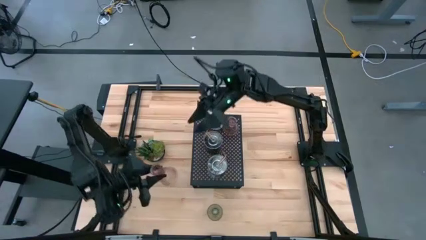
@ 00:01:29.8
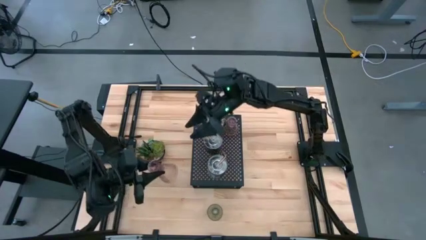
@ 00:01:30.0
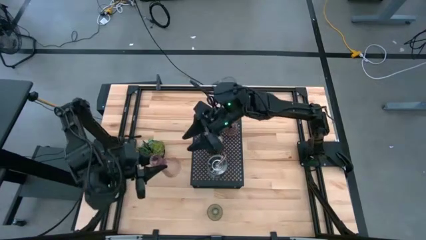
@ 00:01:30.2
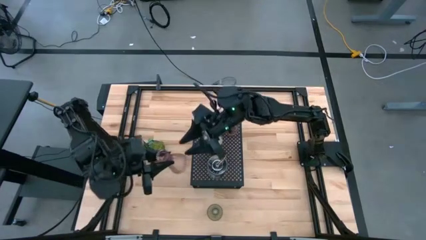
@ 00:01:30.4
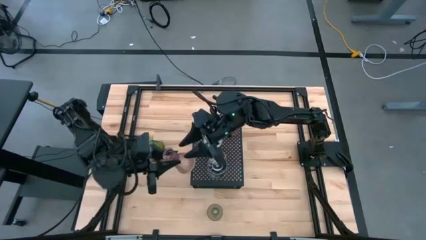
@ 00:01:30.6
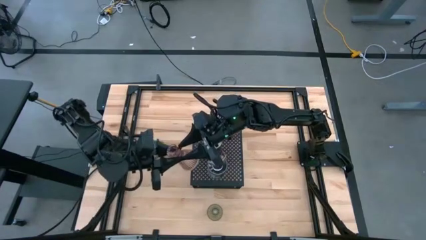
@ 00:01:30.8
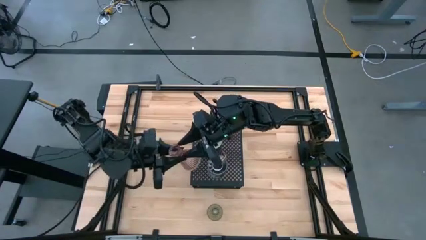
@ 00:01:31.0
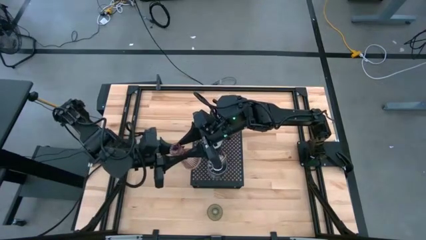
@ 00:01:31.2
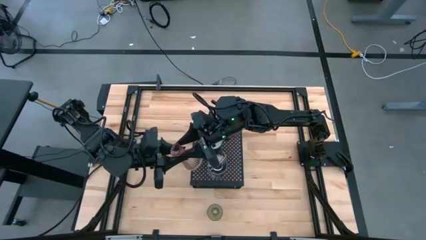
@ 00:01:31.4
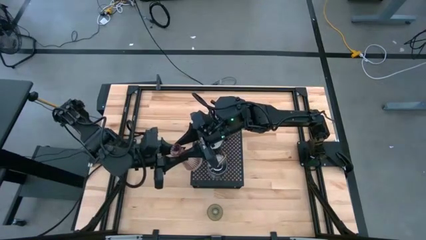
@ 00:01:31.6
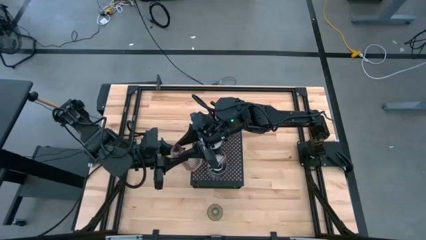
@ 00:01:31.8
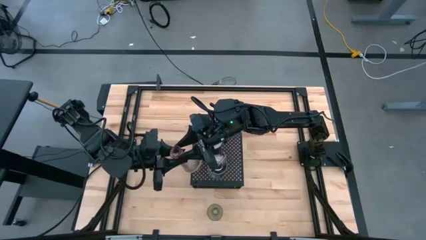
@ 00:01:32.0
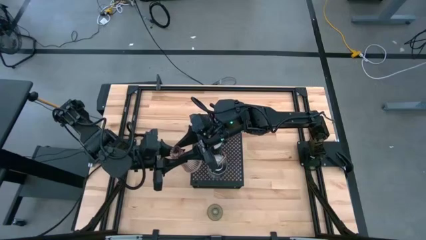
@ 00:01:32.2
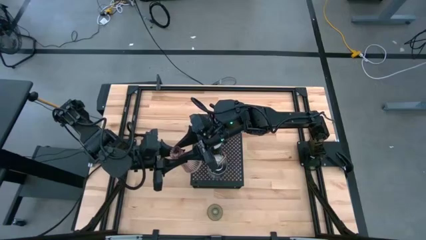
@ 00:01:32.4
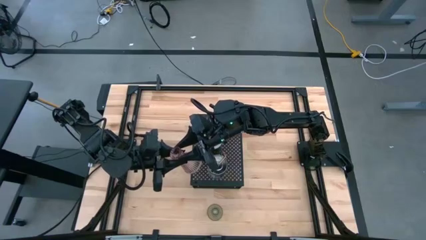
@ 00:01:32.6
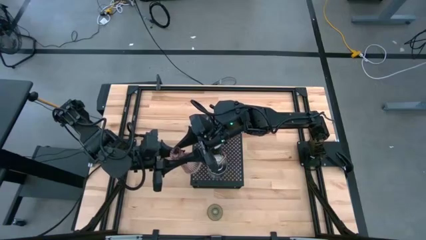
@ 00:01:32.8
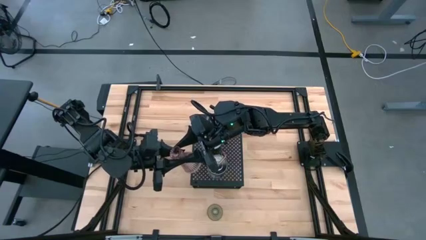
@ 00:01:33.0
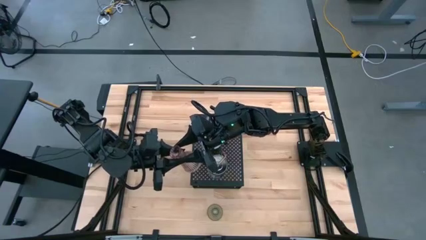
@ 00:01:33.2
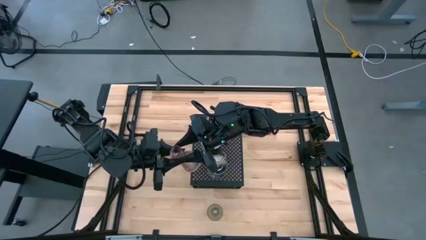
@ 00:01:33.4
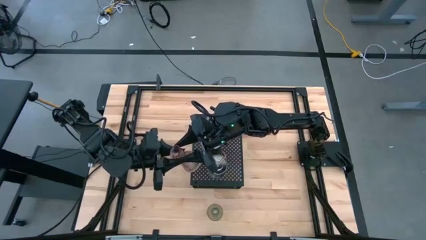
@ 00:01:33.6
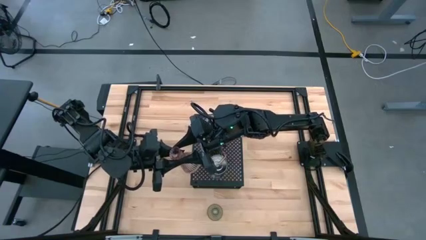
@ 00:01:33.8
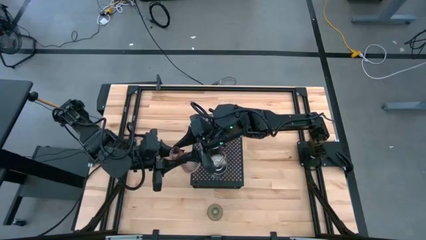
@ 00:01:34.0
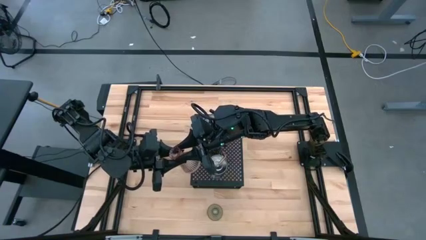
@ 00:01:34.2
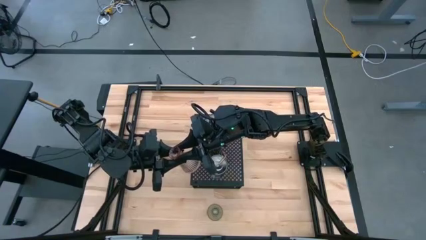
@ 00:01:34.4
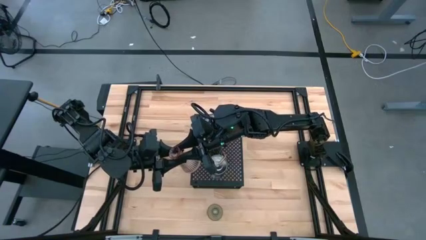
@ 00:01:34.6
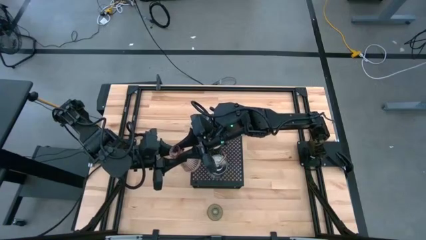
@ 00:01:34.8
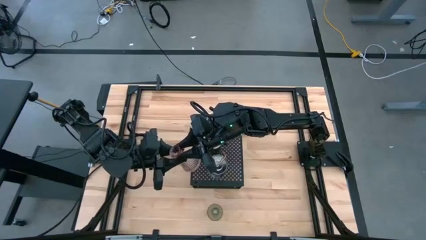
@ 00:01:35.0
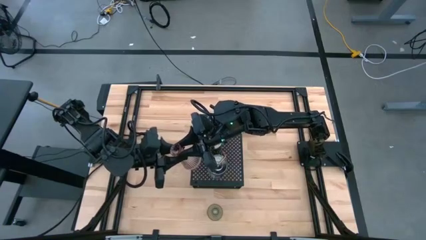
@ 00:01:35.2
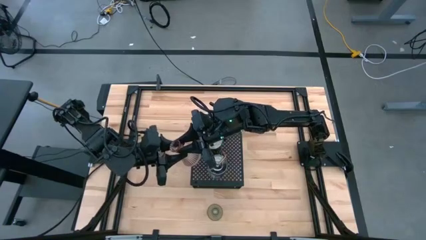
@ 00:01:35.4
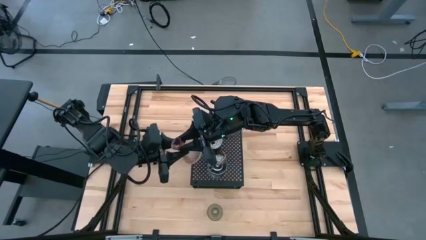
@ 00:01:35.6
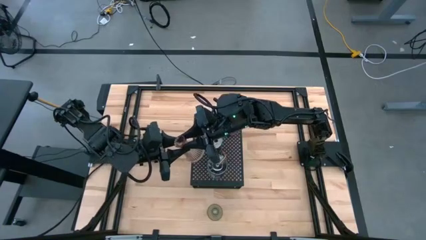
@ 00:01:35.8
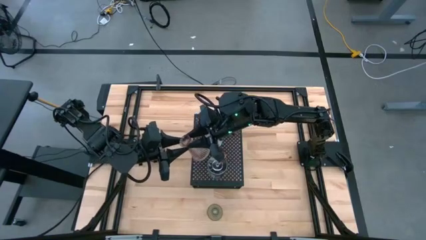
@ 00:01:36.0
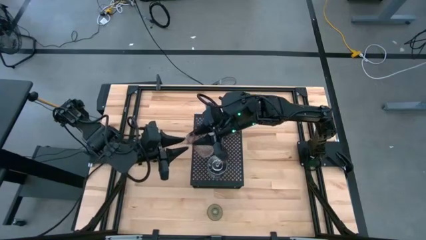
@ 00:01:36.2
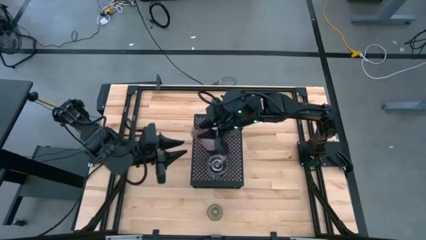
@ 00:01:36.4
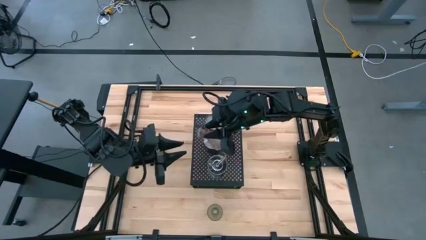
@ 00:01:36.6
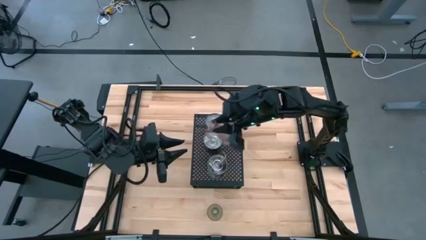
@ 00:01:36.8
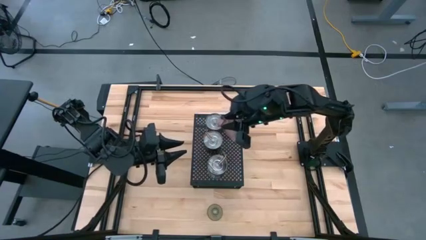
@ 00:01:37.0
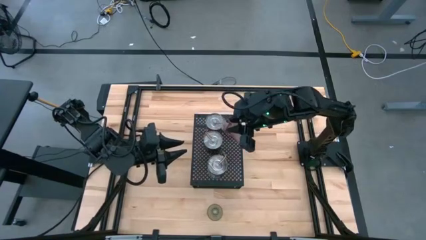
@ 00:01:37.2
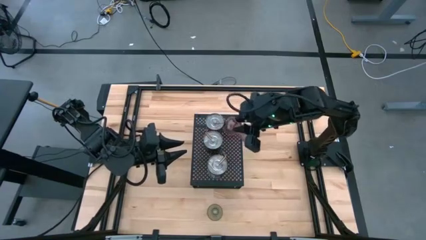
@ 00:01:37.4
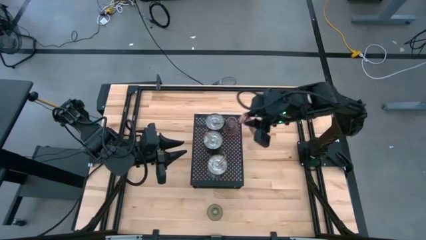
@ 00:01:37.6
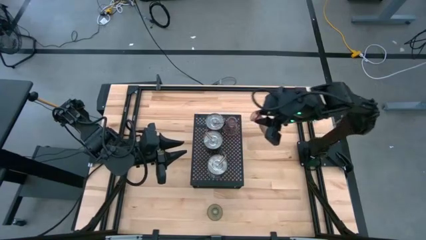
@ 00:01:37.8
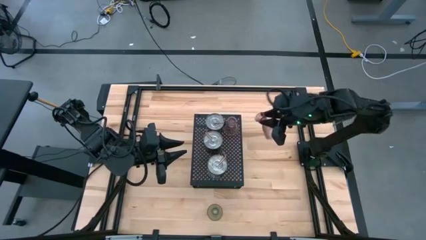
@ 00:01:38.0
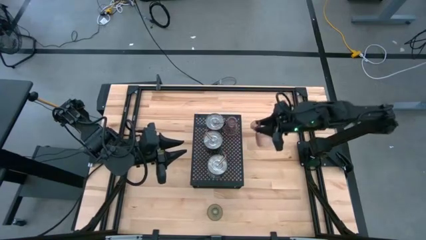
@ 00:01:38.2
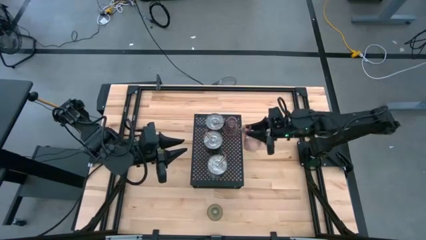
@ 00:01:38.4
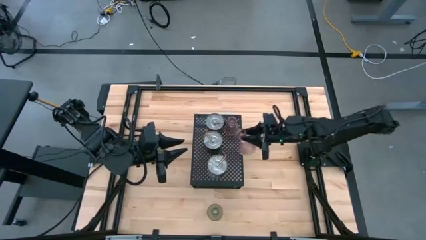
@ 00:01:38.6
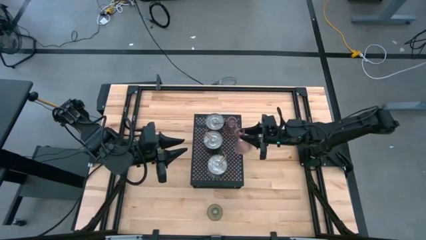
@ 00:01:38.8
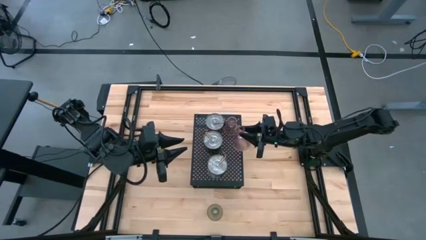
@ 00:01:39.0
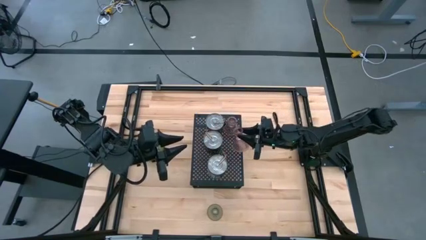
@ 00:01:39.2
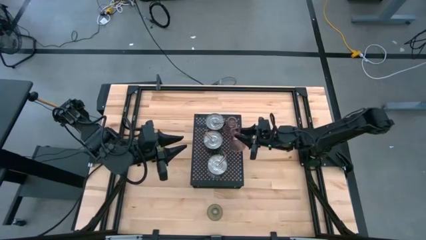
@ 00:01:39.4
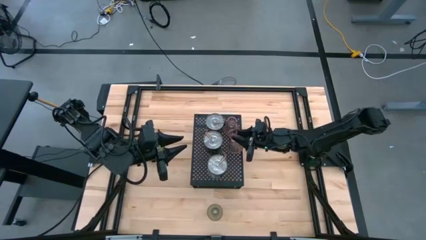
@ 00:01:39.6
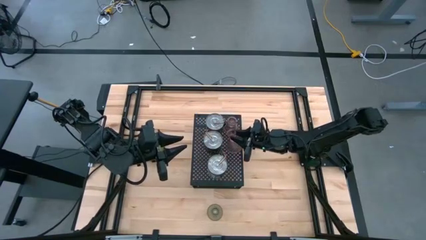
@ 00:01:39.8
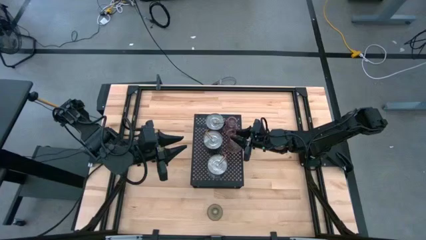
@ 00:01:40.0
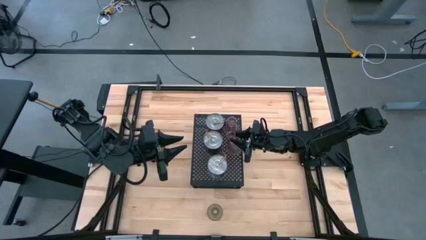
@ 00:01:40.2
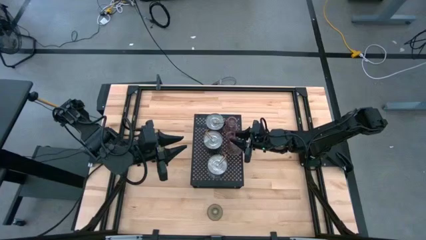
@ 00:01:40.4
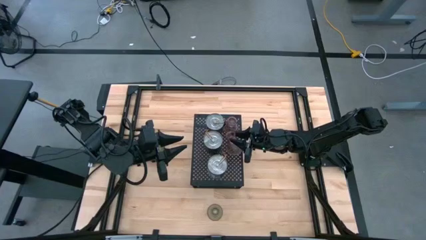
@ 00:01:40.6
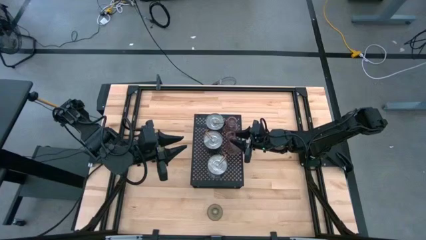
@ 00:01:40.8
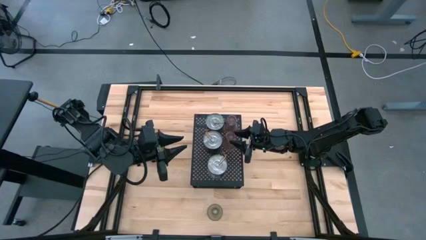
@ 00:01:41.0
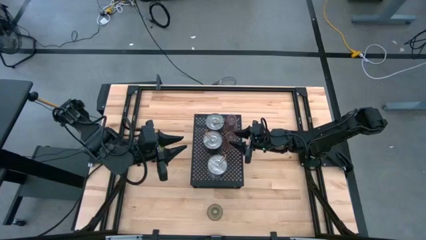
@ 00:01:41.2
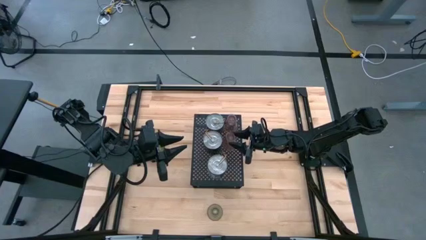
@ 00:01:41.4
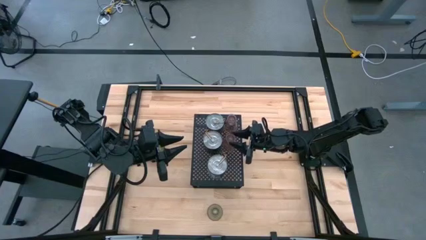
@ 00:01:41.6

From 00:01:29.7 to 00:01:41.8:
Task: Pick & Place candle stick holders
Put the pink glass candle holder on the shelf aligned with the pink glass candle holder

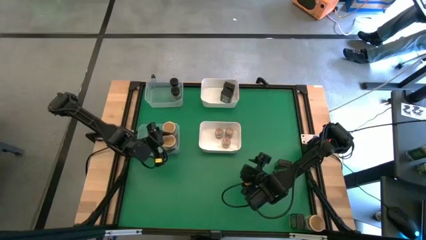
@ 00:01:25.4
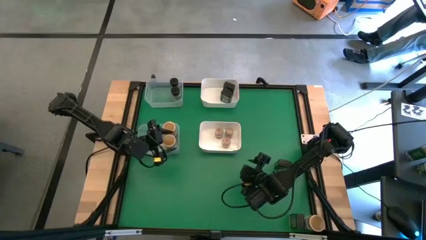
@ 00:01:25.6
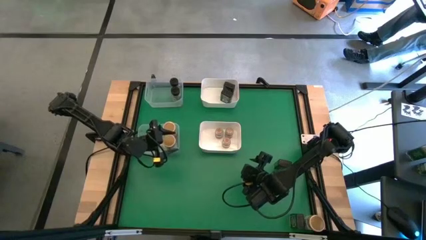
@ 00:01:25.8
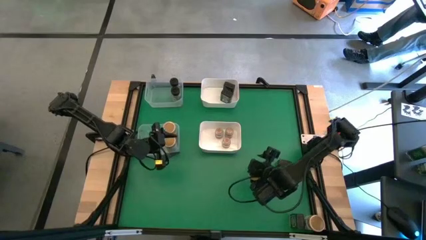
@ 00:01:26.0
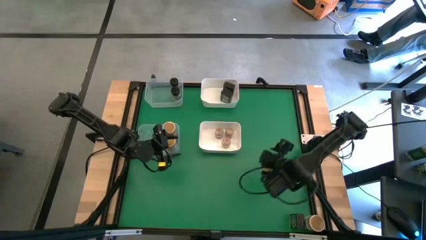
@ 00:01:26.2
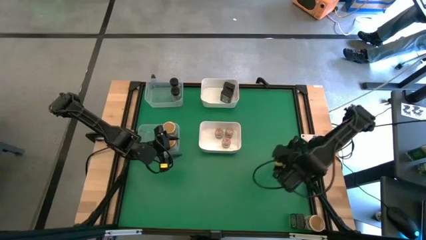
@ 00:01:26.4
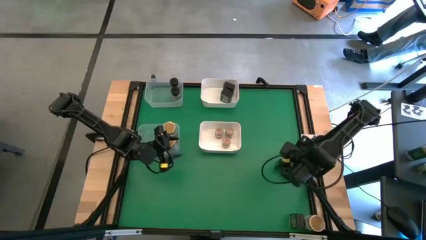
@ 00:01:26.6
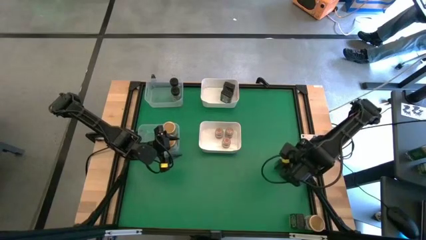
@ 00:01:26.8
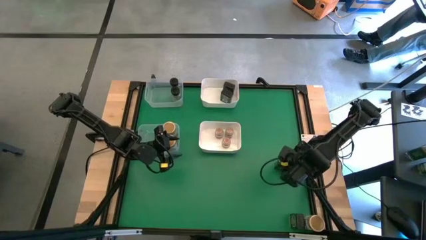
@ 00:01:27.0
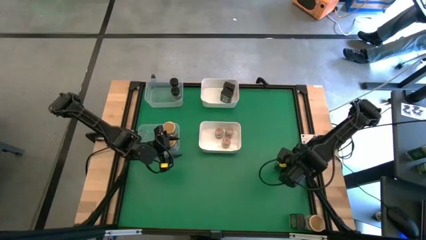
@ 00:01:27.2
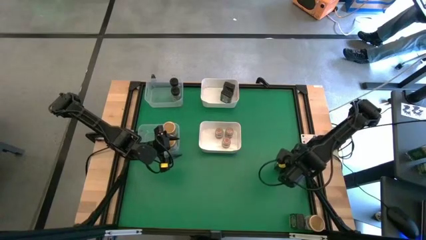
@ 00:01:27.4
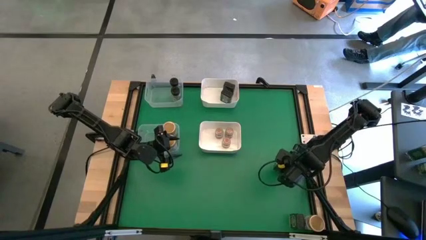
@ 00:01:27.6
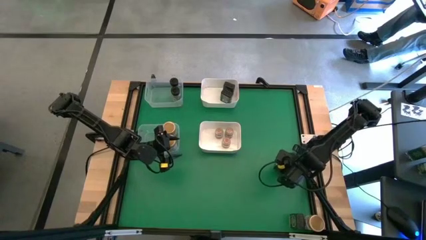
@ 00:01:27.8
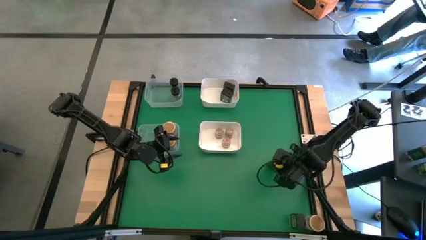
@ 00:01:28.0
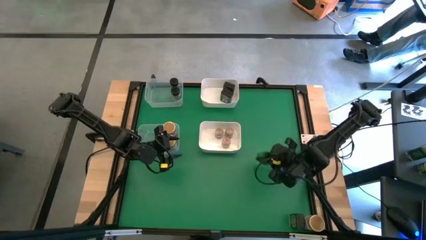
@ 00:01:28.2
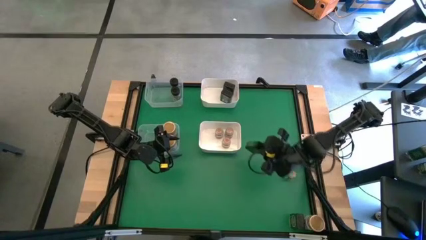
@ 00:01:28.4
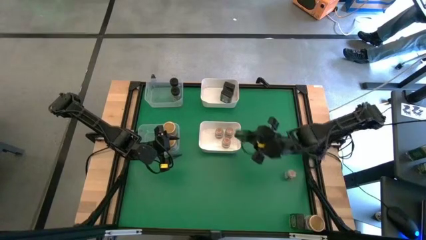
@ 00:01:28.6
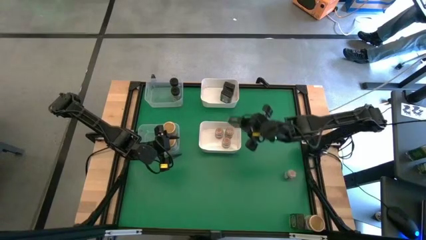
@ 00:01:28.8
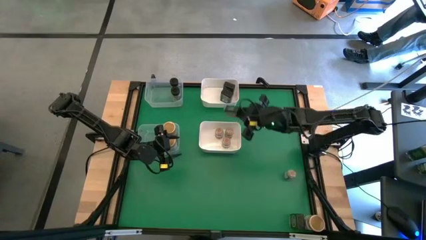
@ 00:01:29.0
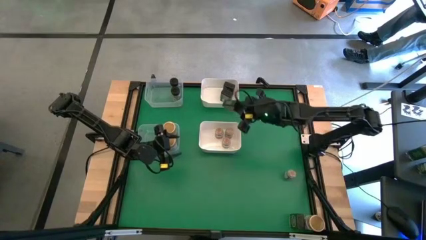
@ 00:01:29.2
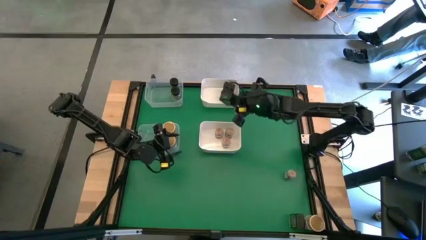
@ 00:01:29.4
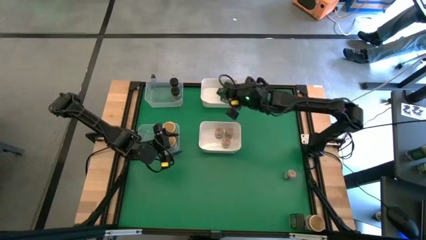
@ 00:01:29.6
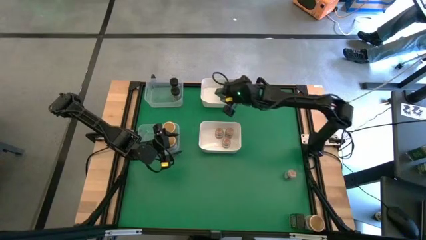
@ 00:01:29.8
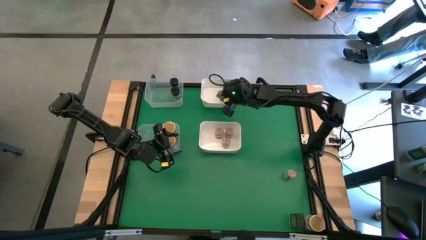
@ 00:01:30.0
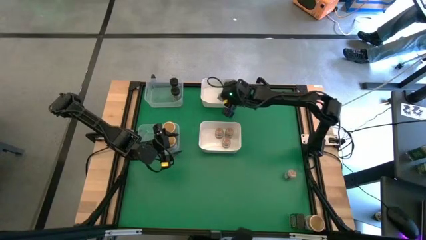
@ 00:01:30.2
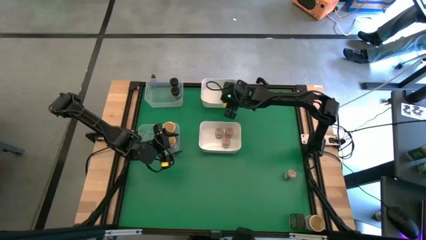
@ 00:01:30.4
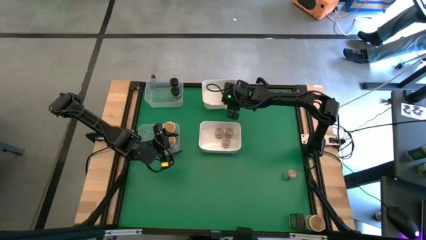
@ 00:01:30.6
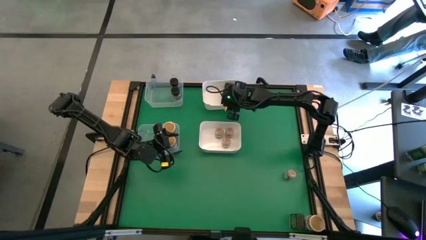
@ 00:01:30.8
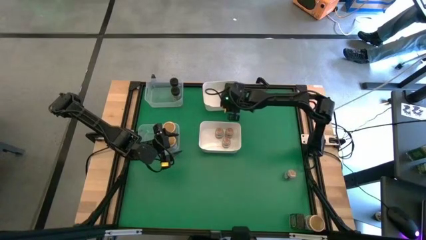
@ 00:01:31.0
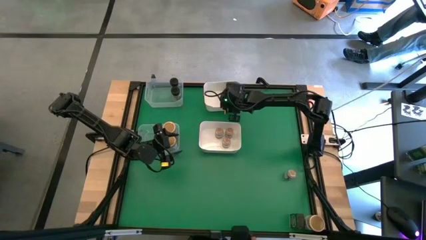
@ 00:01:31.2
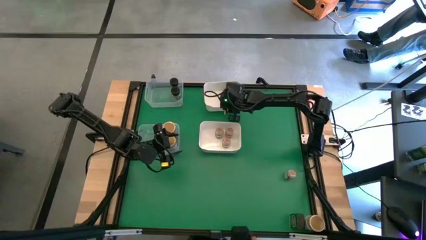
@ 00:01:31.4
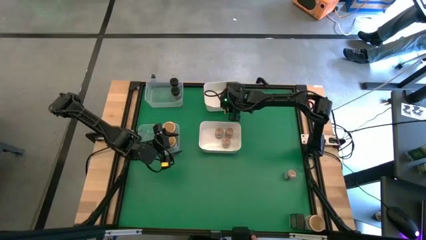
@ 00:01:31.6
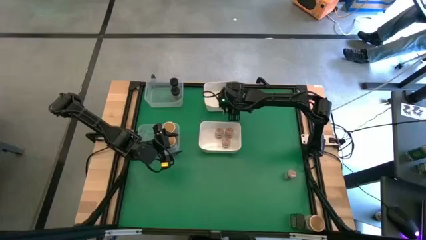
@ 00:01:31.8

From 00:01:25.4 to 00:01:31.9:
Task: Sort spices by type
Put the top black seasoning can into the top white bin
